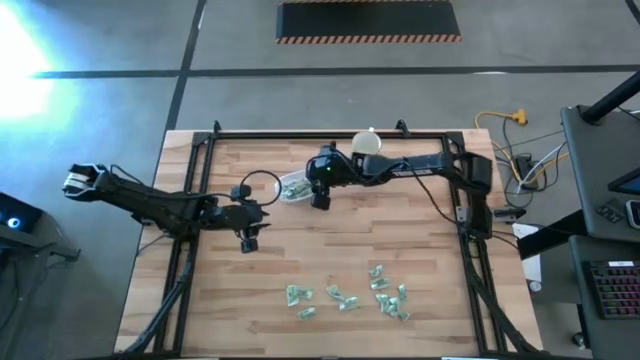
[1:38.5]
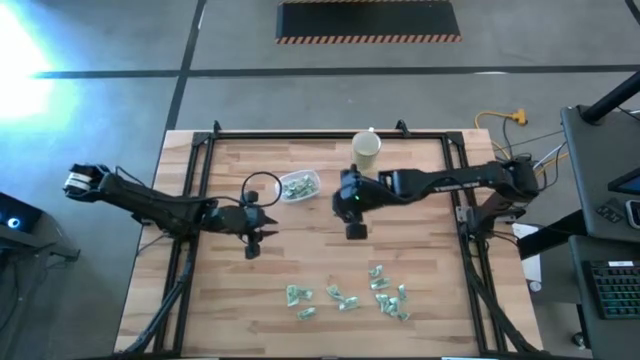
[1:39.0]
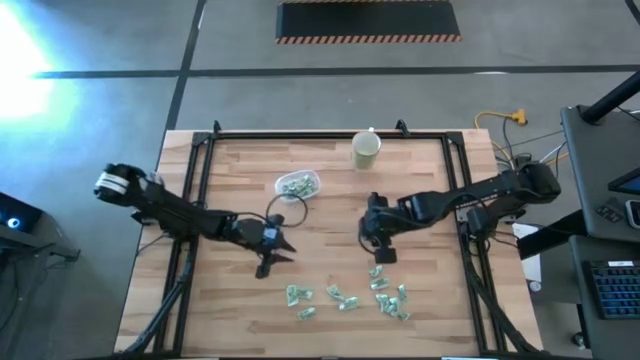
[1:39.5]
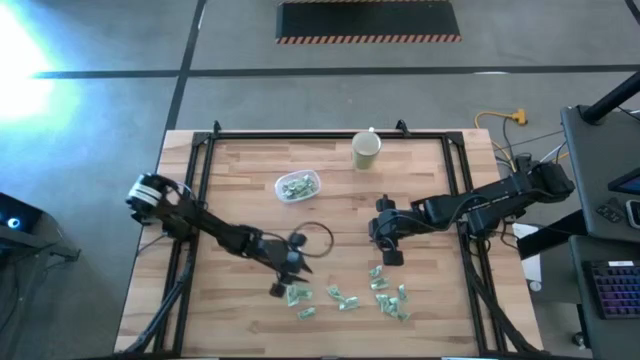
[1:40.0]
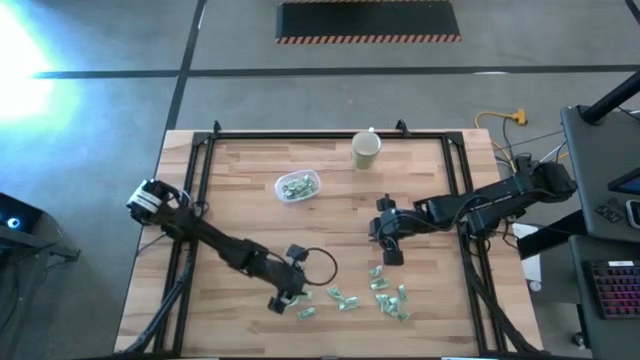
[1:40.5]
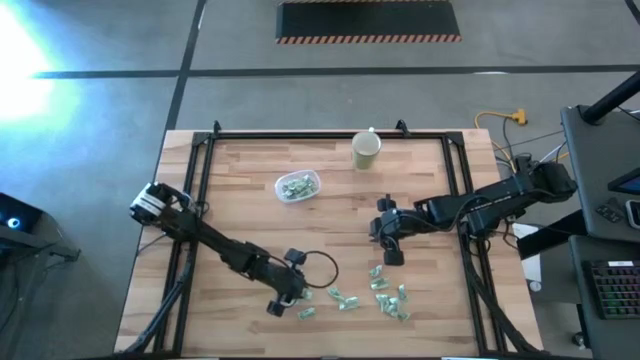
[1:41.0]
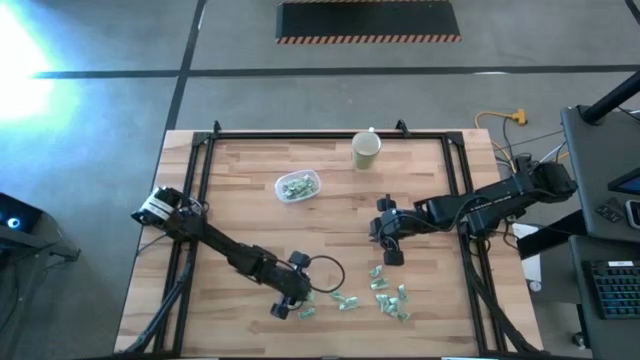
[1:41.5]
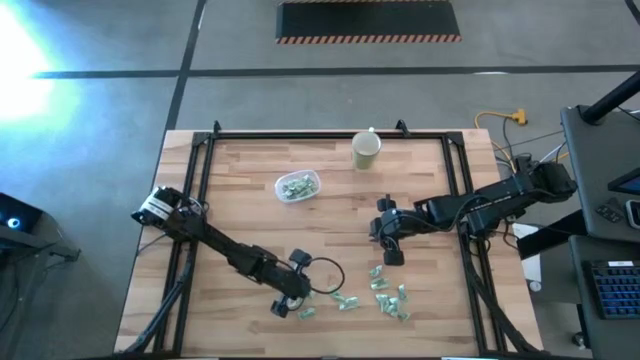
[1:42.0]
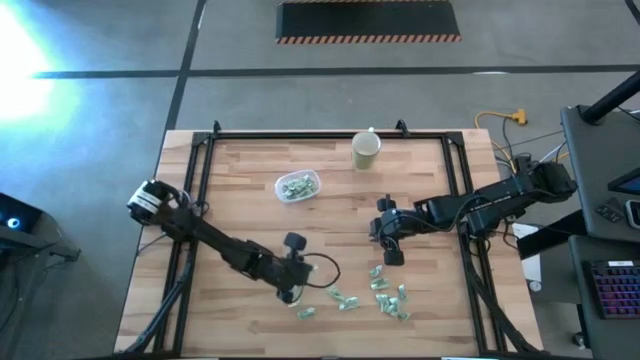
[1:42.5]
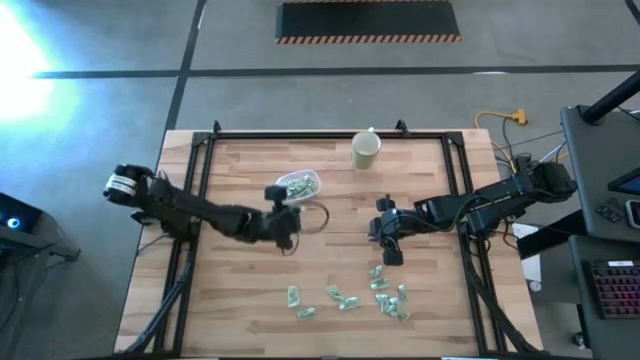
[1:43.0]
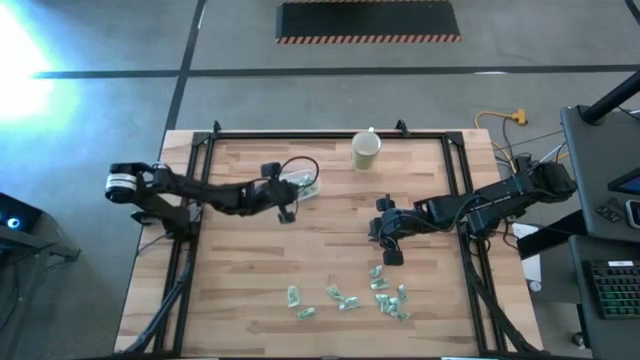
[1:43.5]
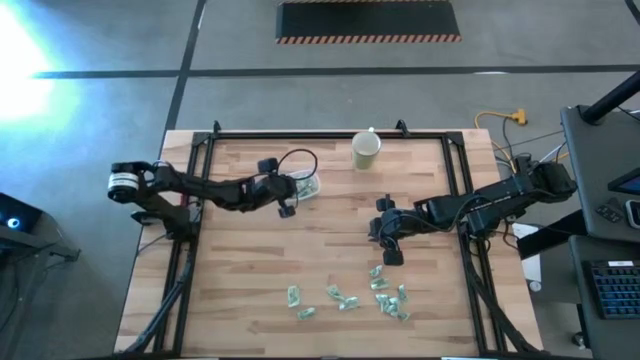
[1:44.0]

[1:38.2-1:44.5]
Task: Pick and place Stevia / Truvia into bins
Put the stevia packet into the transparent container

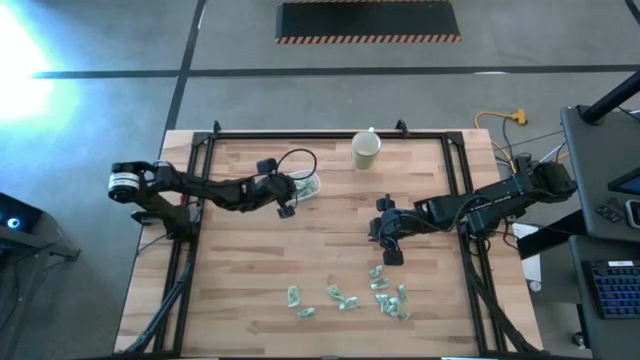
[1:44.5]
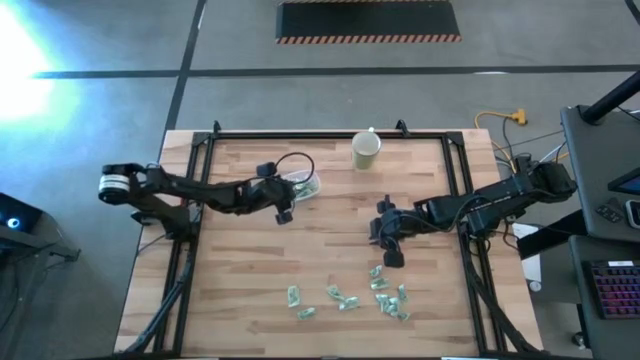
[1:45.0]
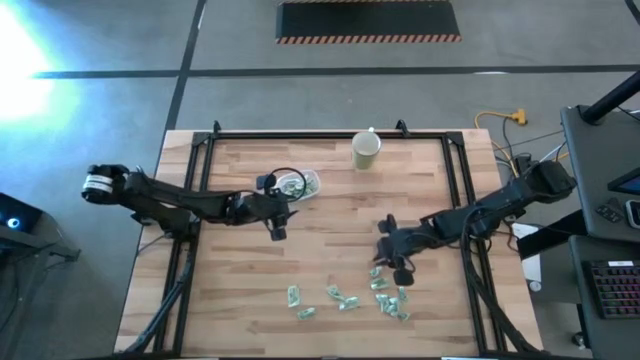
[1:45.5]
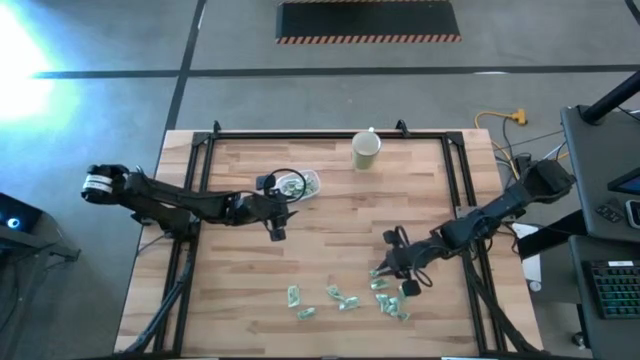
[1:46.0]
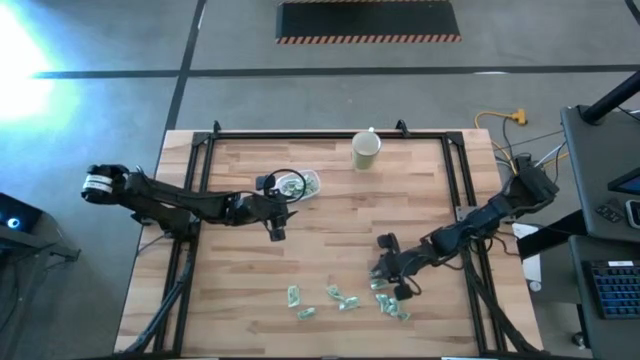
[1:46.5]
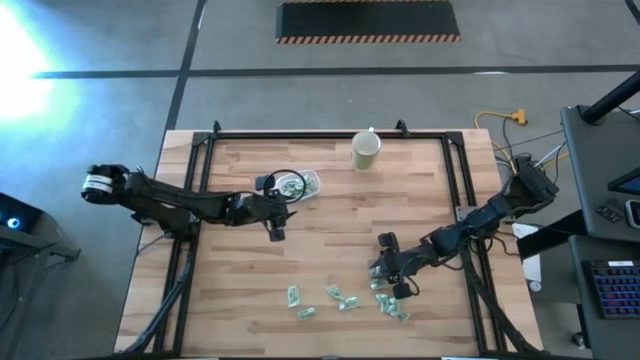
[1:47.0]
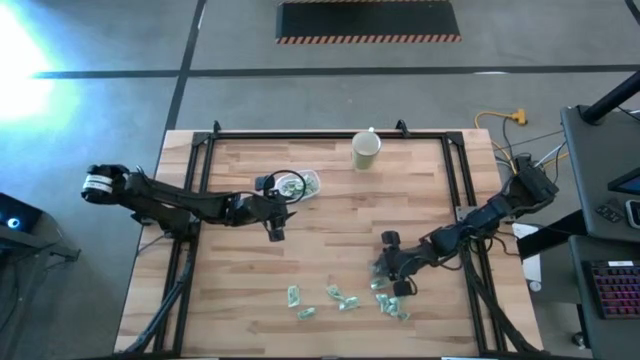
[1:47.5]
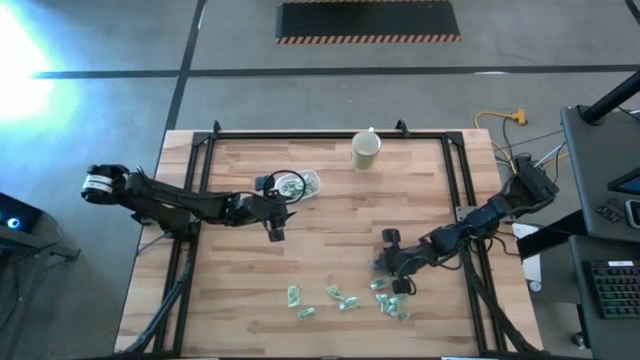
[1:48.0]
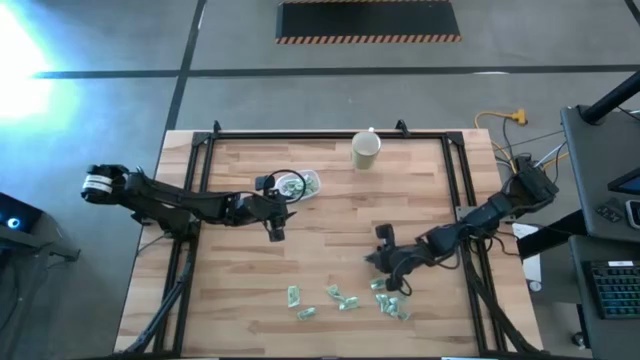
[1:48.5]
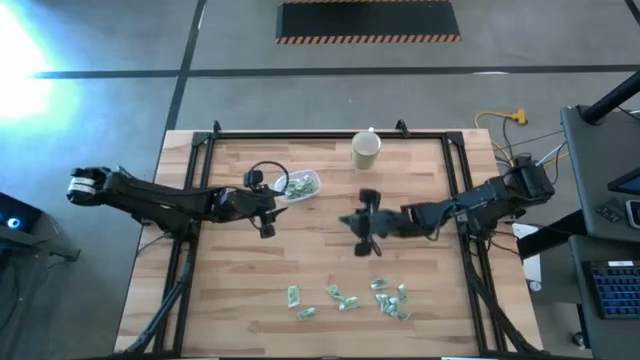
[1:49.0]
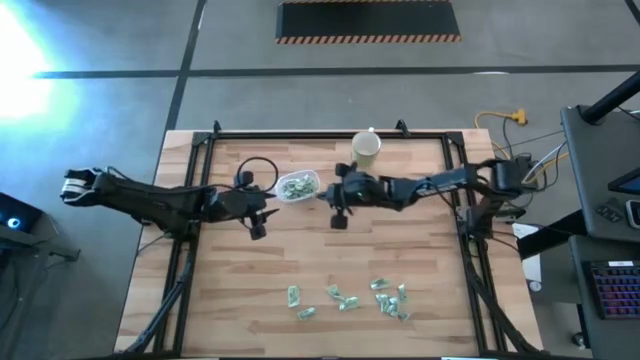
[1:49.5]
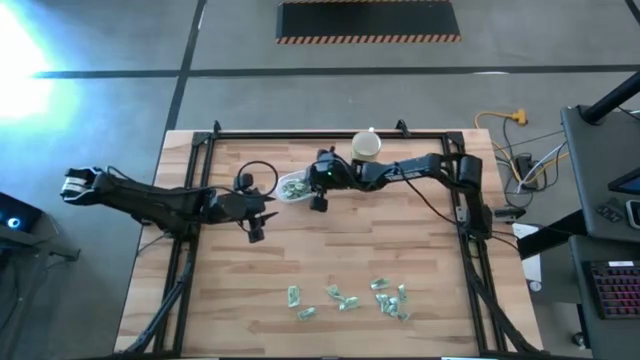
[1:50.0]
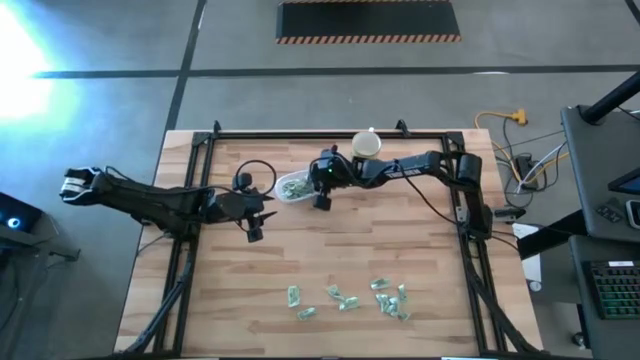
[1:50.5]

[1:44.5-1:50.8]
Put the stevia packet into the transparent container

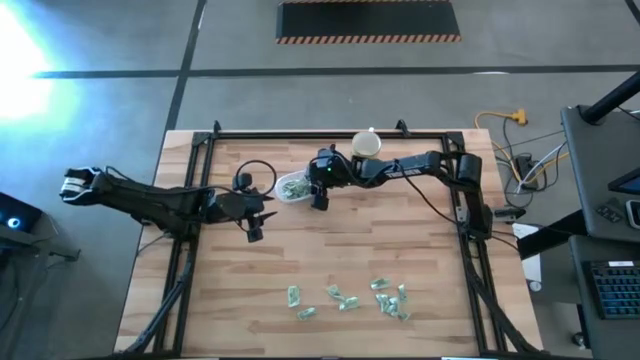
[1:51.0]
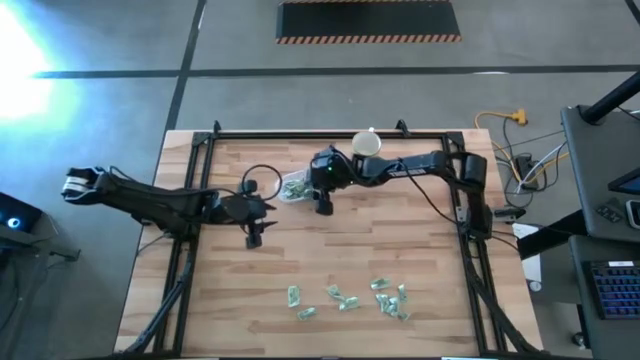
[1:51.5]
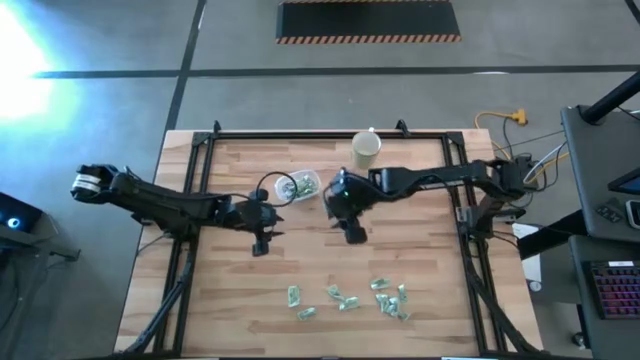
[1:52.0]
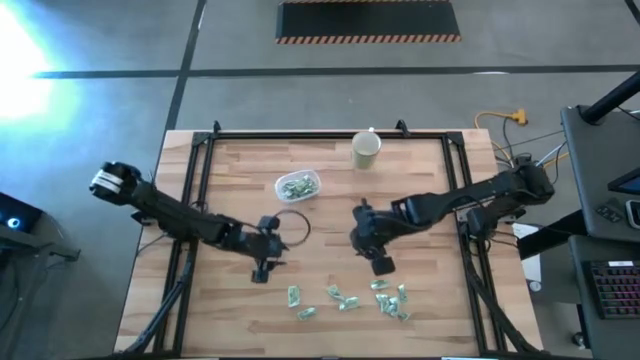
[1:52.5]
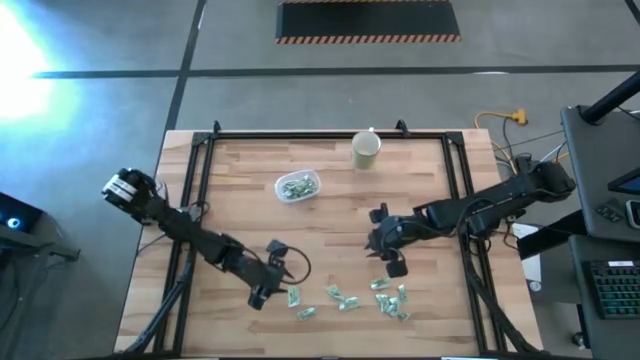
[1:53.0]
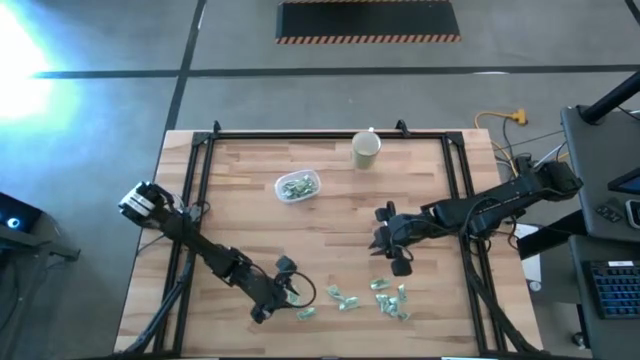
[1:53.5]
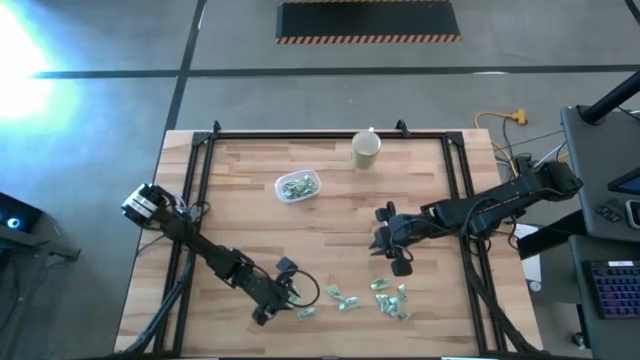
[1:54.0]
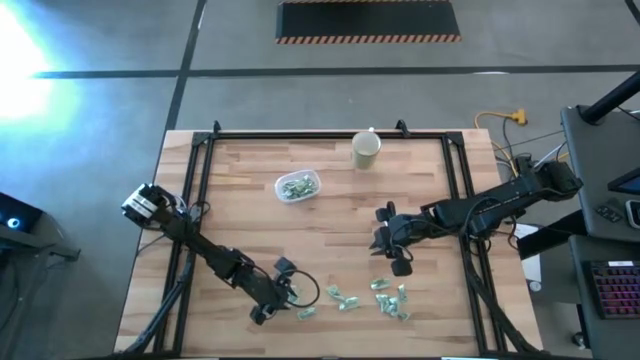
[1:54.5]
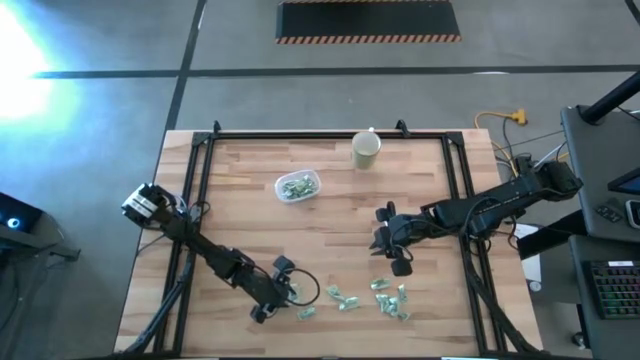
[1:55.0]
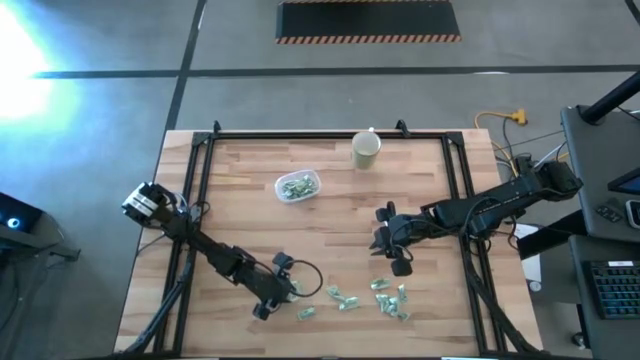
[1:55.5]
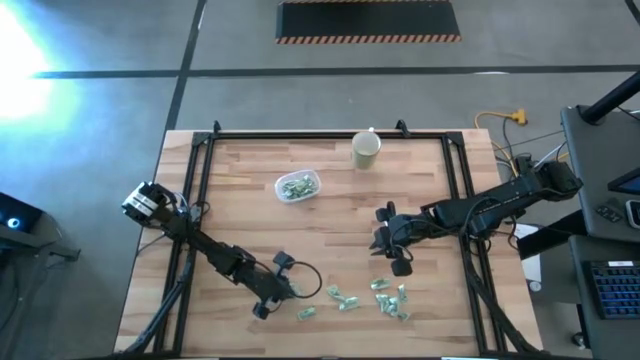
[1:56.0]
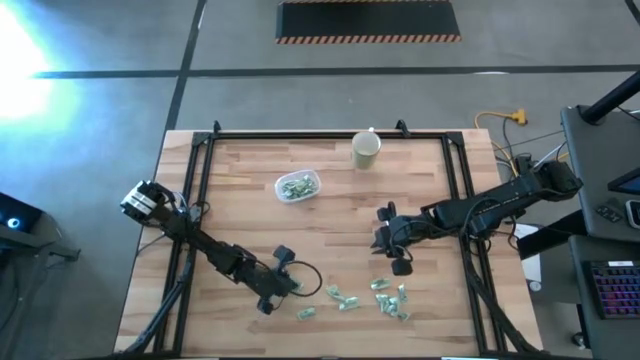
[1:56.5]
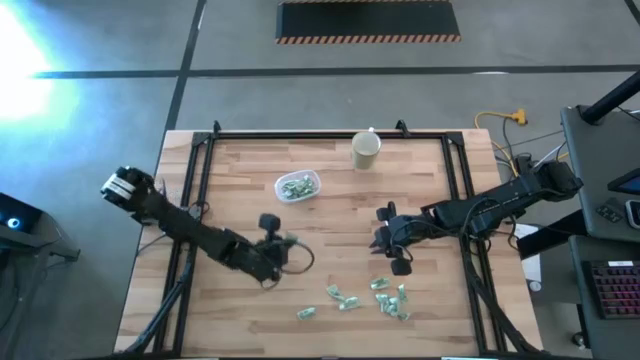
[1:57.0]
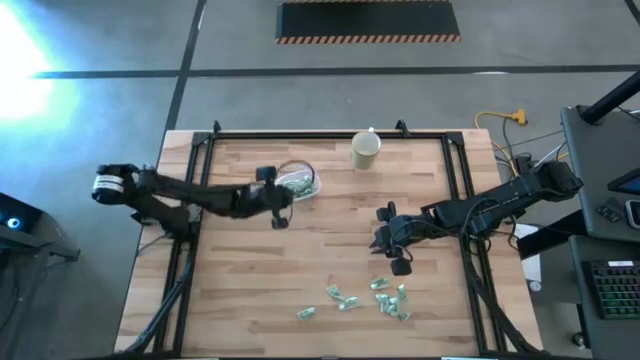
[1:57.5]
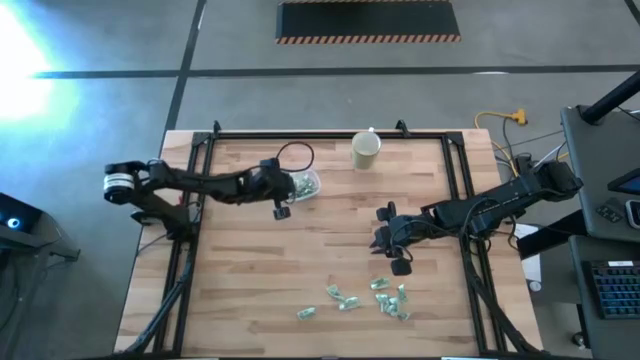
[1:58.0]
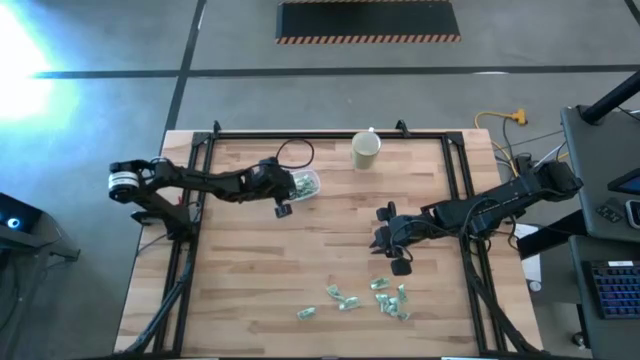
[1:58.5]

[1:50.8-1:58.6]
Put the stevia packet into the transparent container
